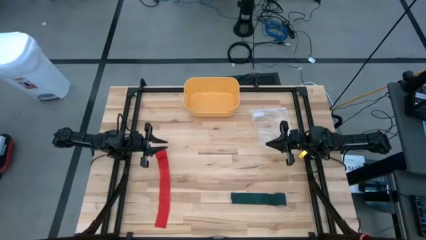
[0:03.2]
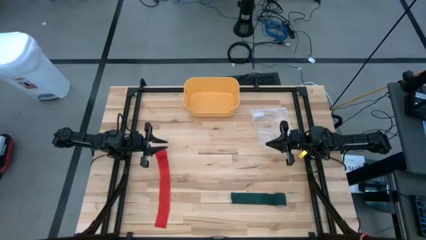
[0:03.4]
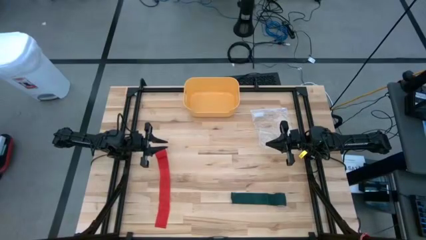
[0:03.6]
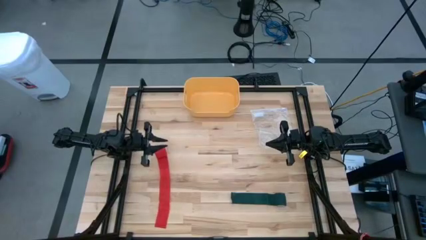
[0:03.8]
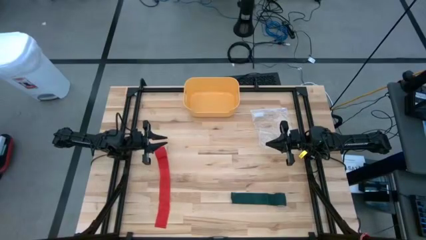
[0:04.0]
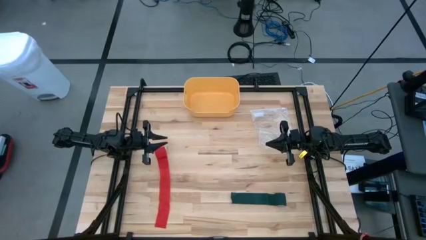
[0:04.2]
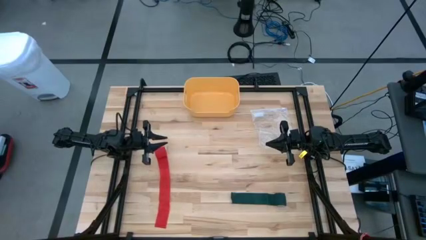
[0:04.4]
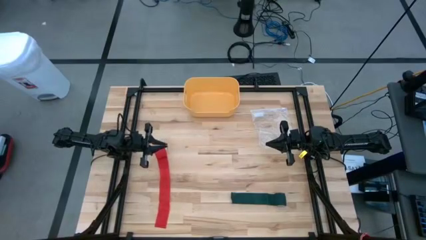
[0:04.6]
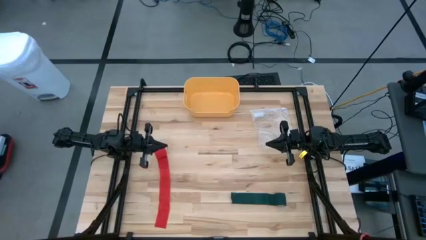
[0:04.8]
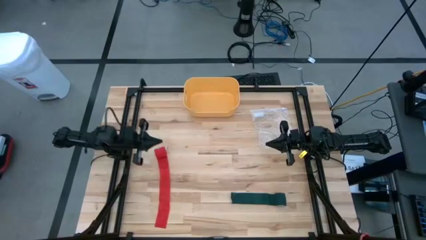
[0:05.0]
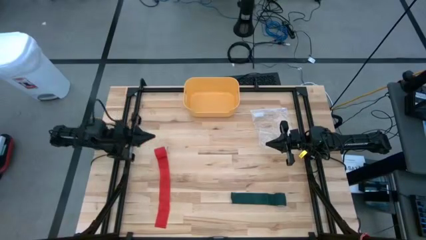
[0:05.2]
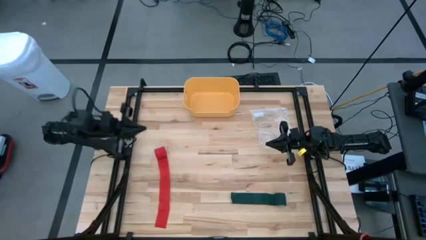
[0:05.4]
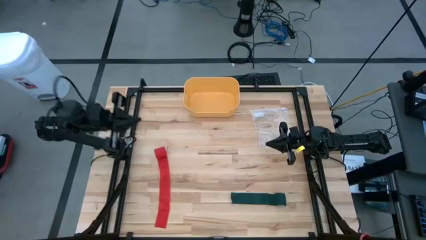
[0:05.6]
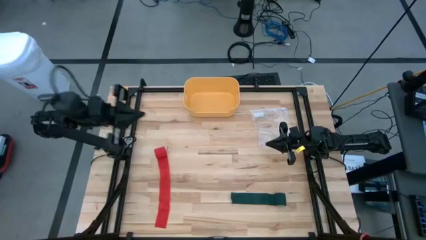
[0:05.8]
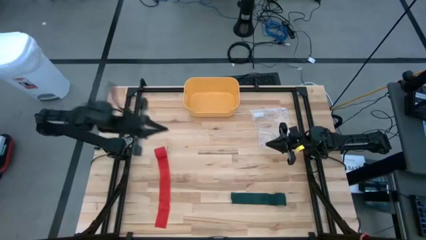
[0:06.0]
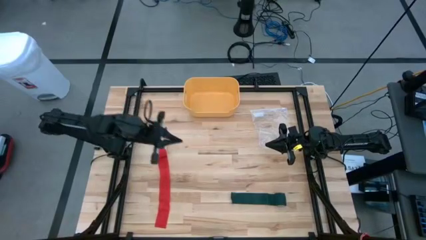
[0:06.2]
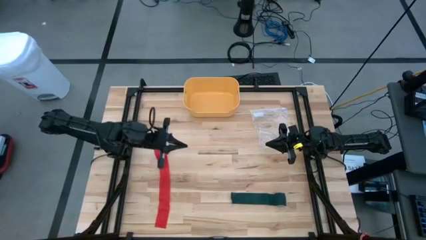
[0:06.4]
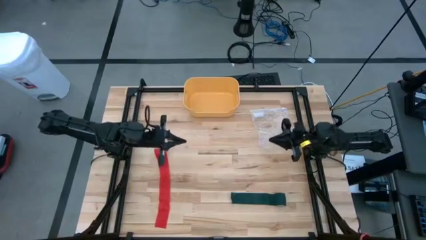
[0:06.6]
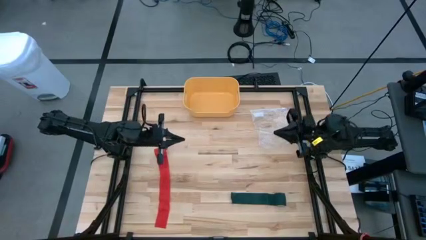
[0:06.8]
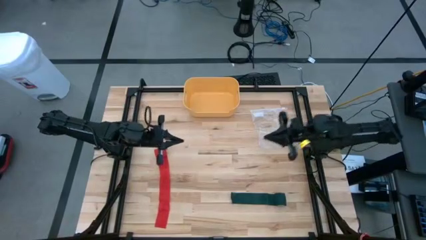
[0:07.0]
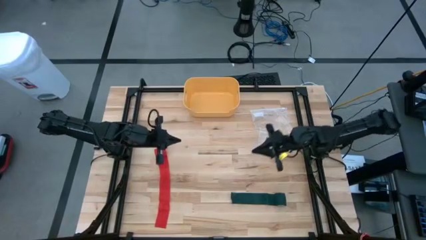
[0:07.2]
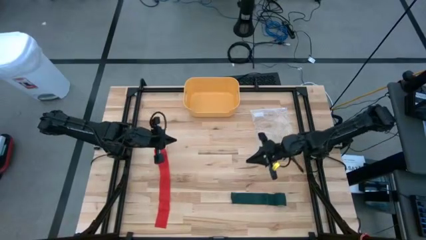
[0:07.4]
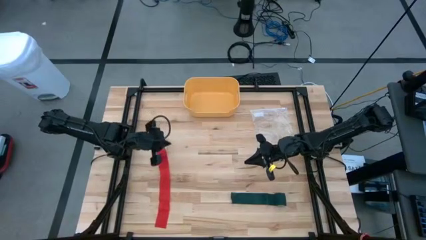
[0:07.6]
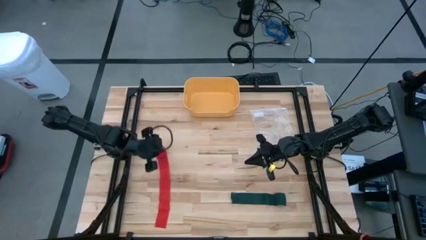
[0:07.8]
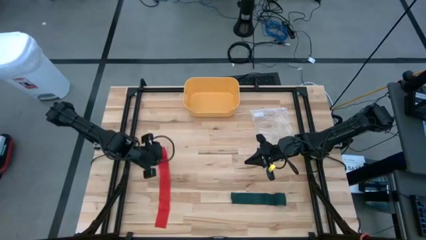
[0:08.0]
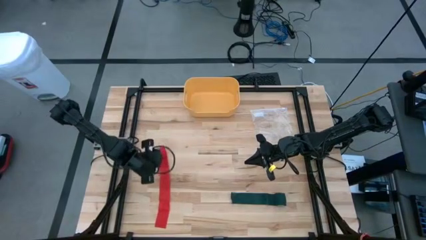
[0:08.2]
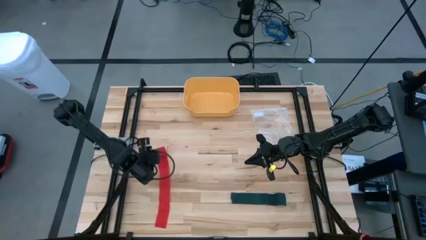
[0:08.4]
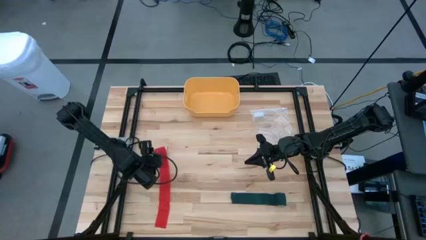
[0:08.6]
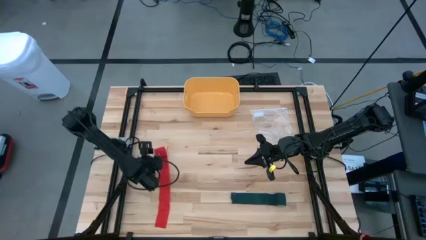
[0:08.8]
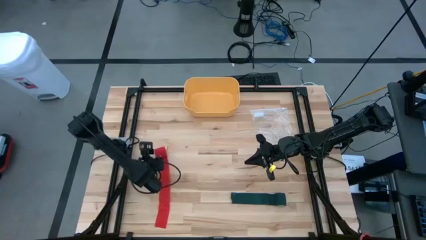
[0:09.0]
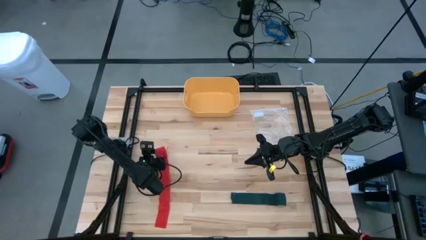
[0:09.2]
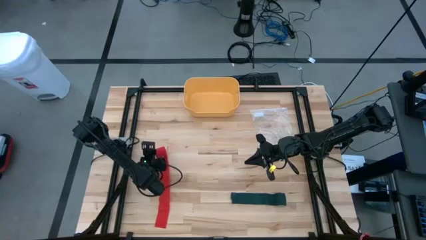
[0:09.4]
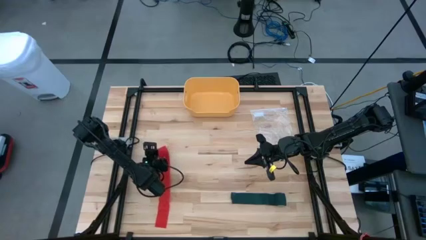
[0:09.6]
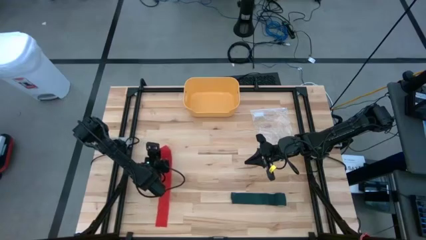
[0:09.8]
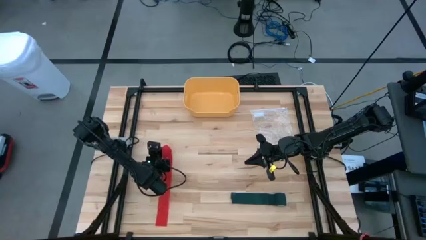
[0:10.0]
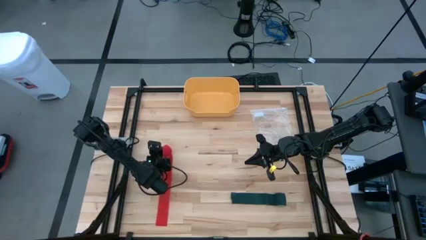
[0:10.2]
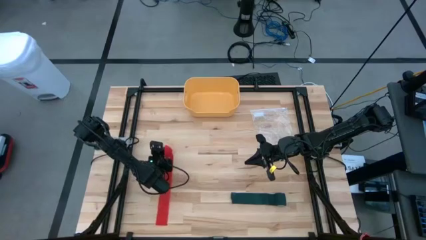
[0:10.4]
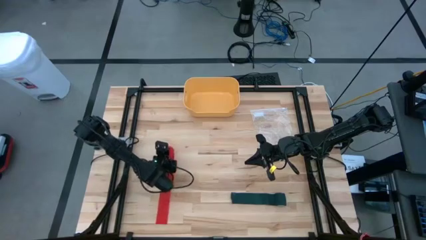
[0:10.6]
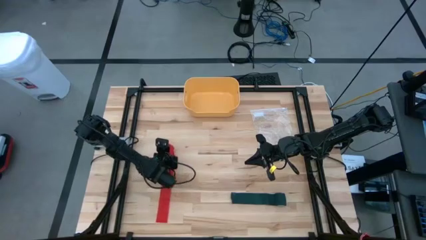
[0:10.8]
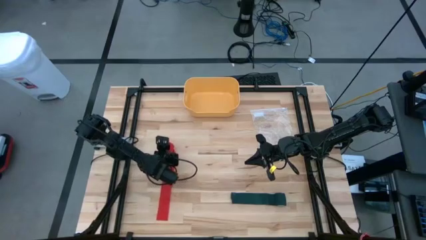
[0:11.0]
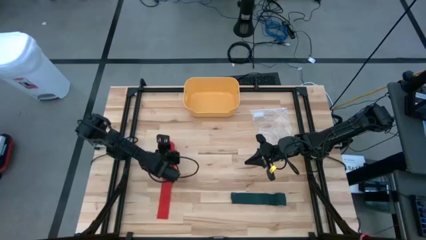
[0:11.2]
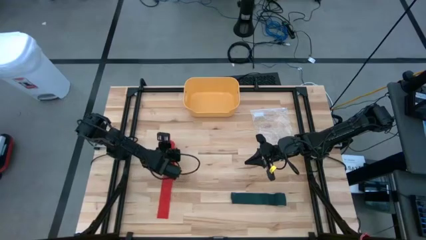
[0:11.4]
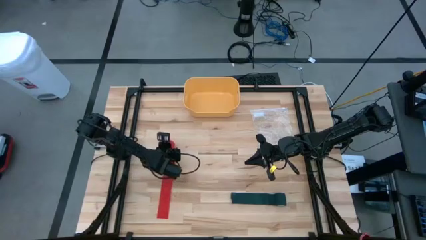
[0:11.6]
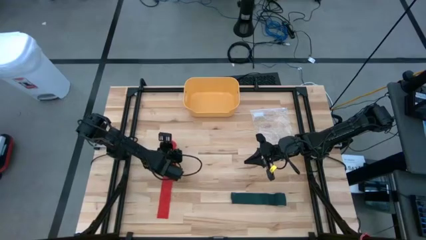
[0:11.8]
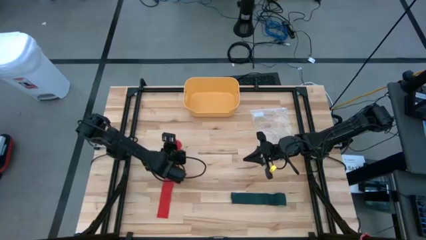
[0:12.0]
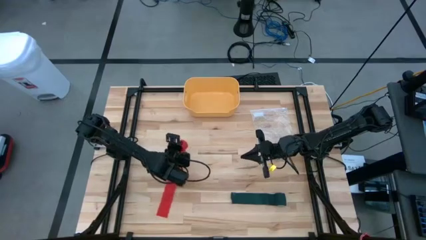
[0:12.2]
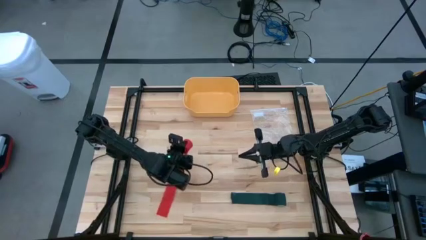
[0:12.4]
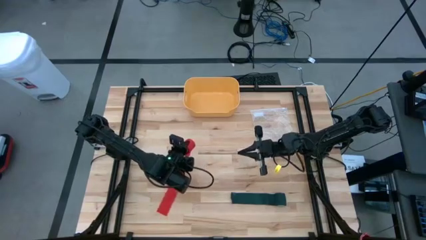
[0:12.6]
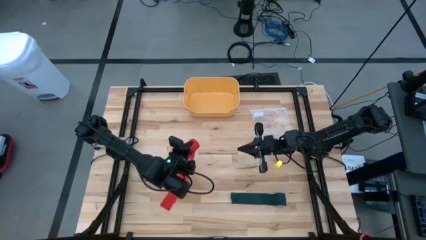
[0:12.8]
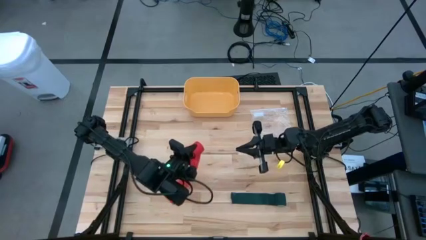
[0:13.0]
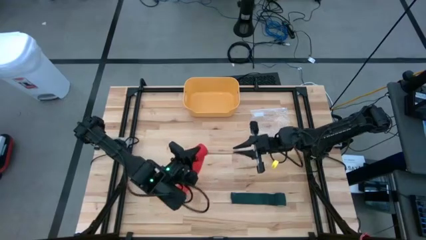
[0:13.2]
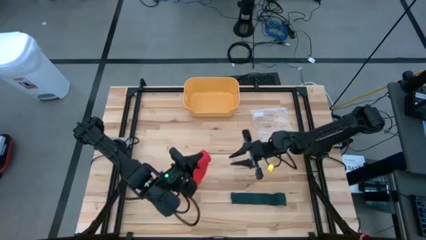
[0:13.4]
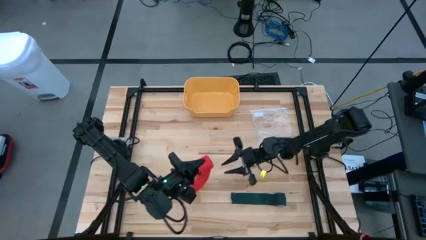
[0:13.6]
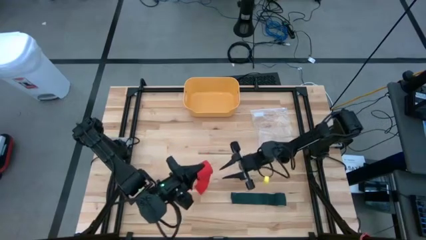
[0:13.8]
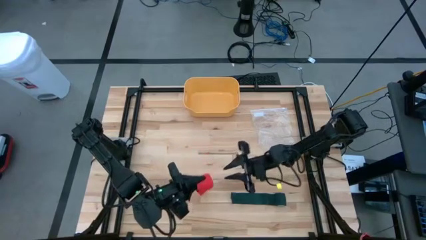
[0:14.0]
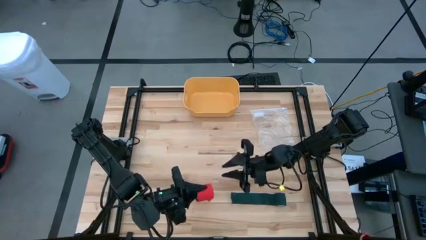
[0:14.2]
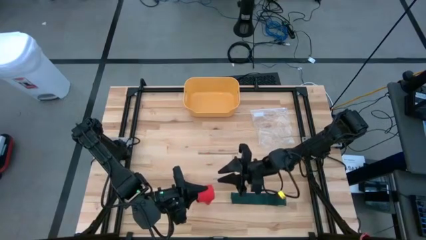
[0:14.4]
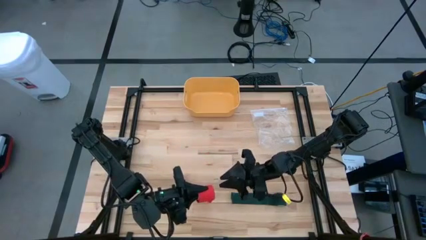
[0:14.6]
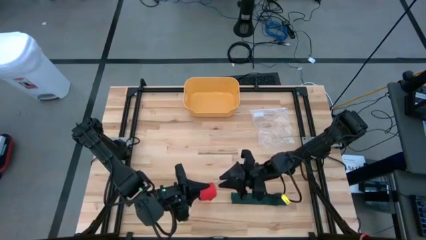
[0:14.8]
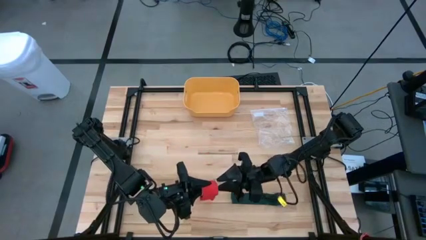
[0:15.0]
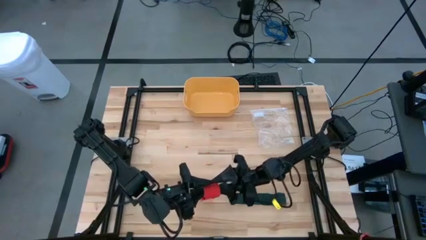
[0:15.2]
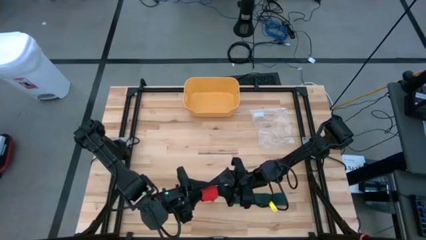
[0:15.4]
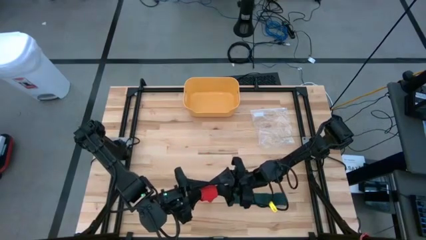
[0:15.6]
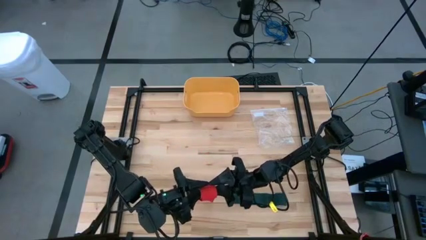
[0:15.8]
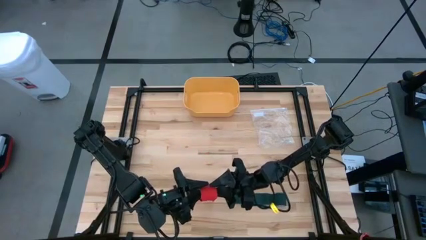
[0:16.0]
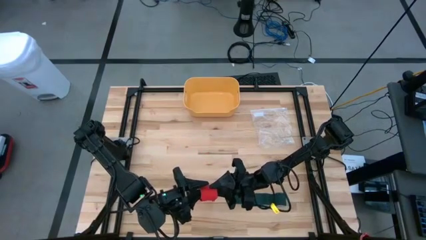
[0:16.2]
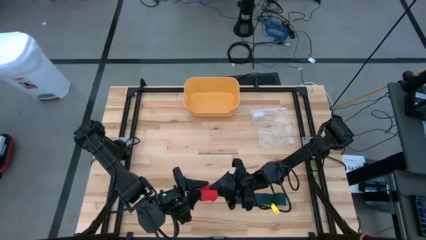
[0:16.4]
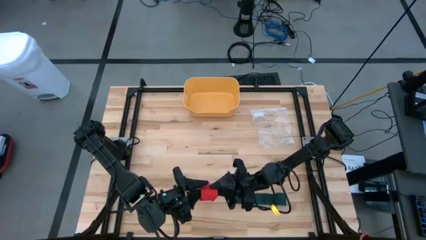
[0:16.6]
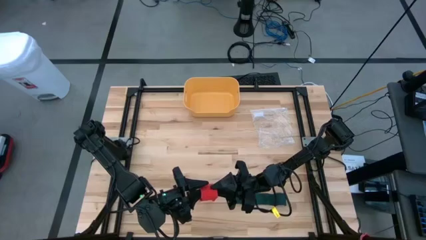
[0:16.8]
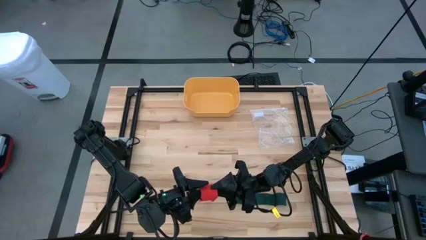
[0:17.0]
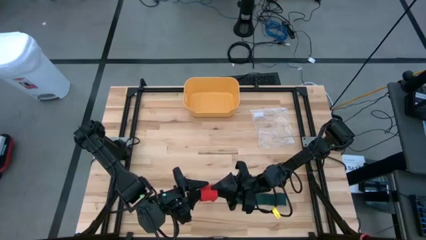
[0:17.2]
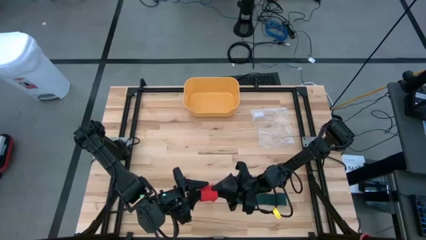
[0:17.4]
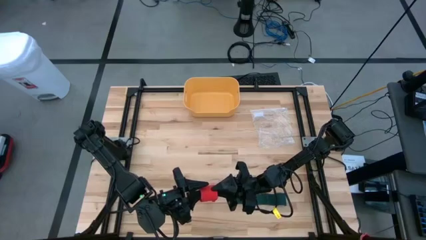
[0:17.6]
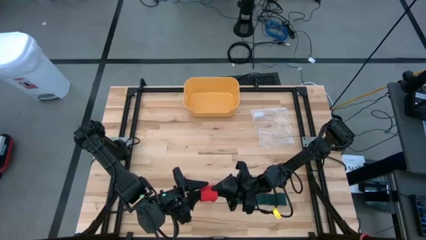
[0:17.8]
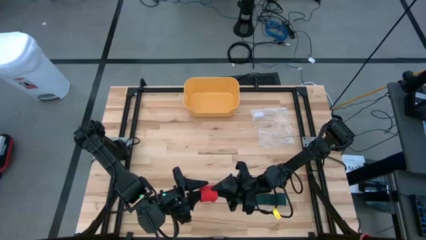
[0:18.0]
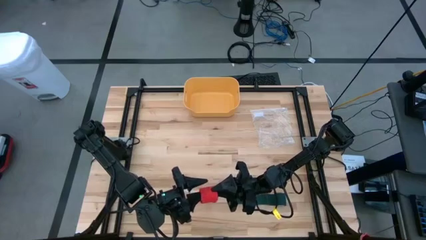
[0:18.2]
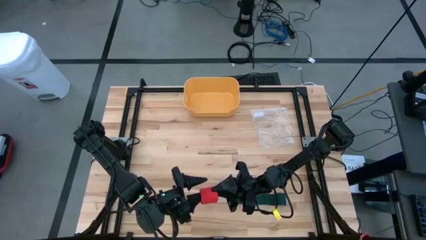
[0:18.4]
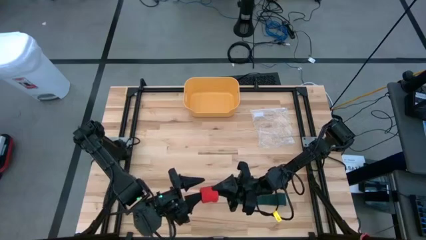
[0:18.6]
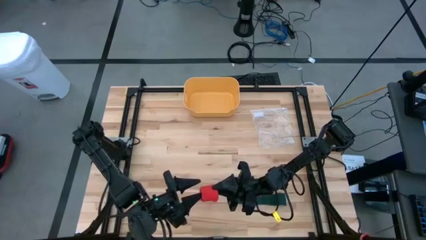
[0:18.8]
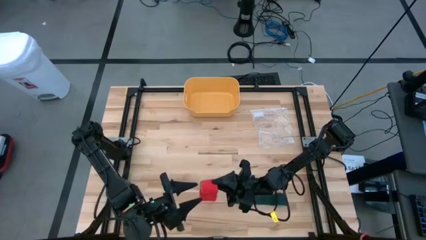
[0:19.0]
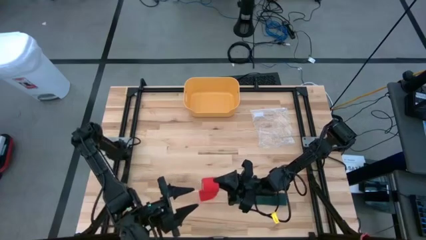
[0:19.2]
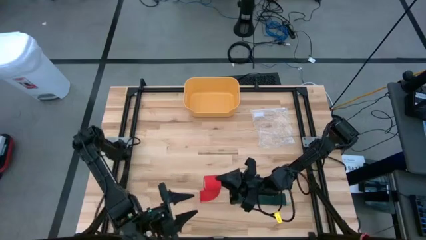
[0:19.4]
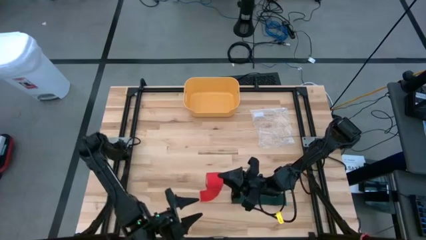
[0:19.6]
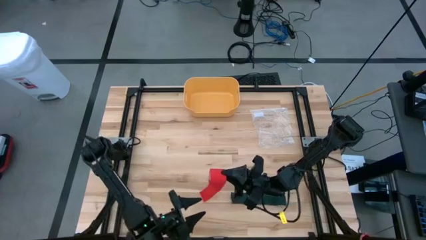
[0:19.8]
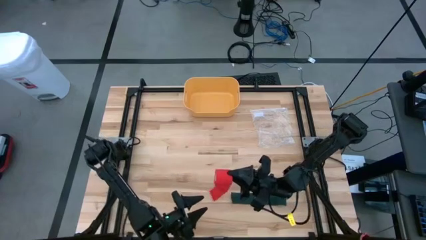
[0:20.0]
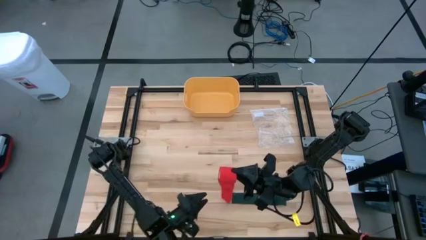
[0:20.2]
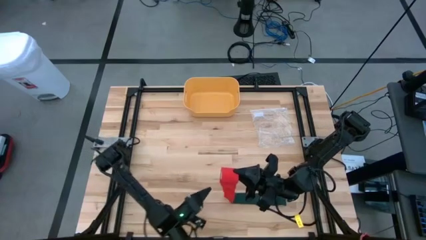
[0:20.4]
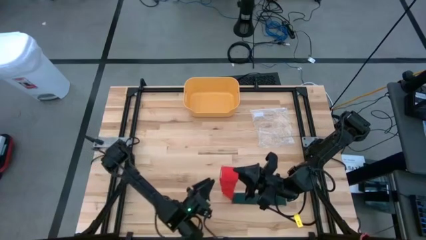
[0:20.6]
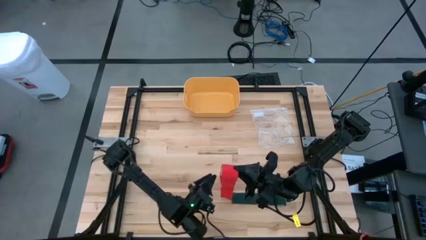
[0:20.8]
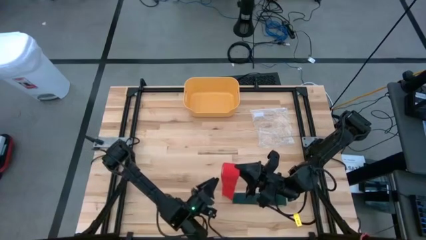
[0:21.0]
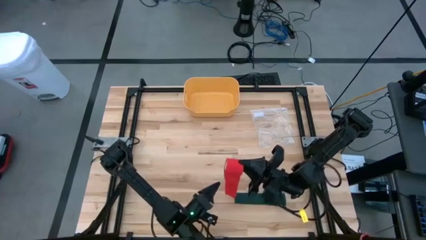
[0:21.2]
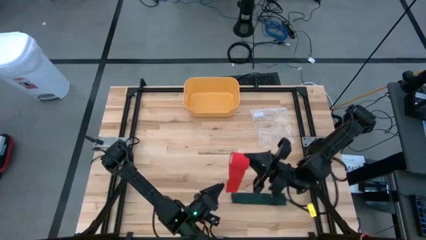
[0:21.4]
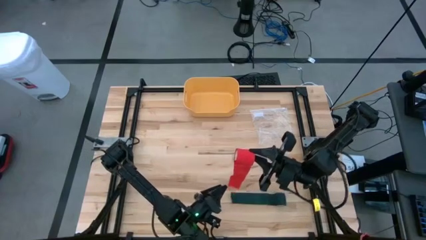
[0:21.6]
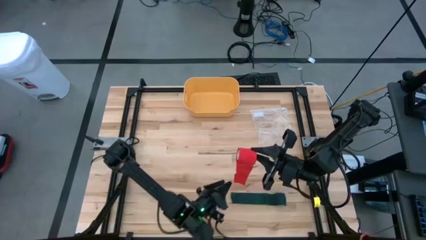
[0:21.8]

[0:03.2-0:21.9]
Task: Roll bandage
Roll the red bandage
